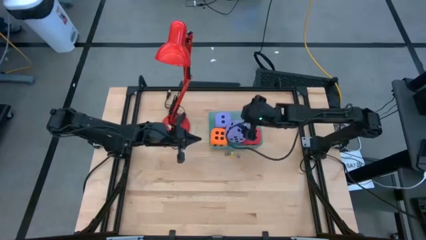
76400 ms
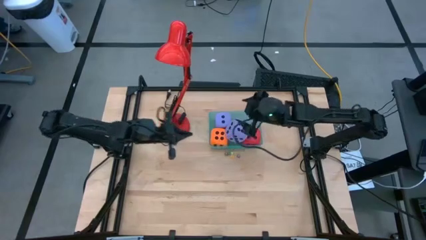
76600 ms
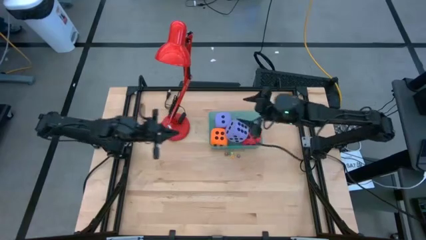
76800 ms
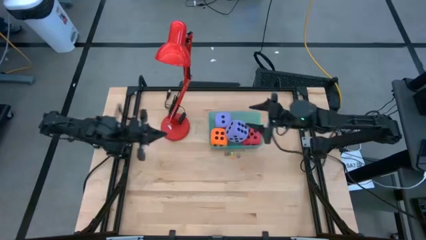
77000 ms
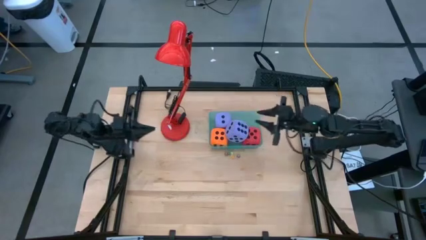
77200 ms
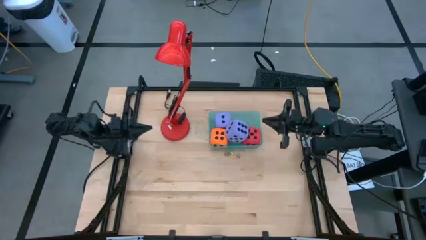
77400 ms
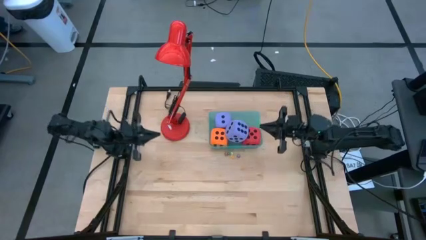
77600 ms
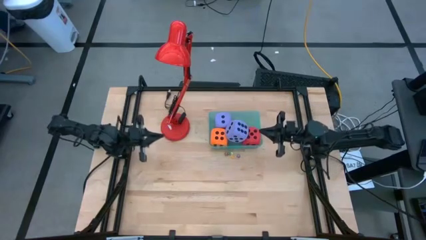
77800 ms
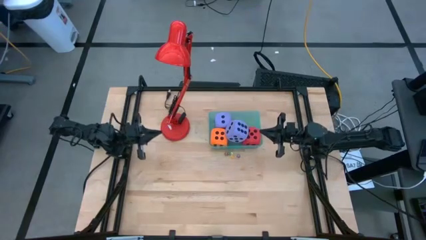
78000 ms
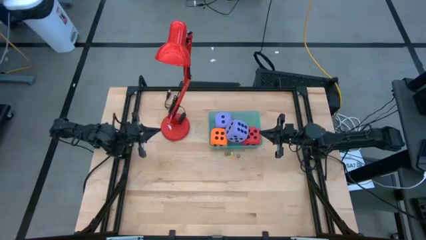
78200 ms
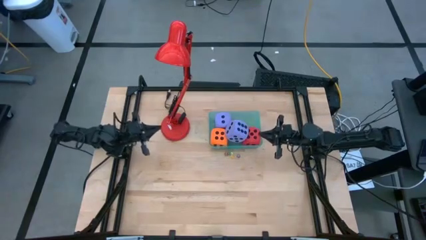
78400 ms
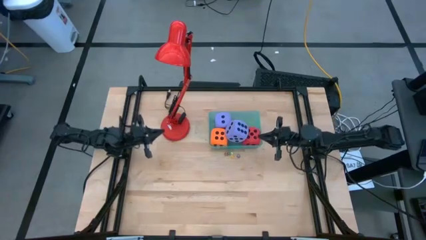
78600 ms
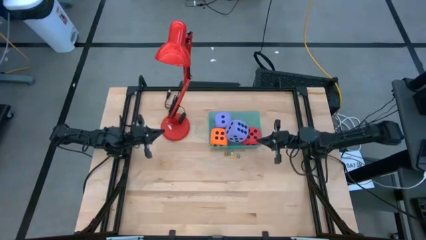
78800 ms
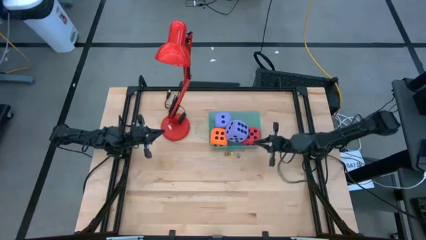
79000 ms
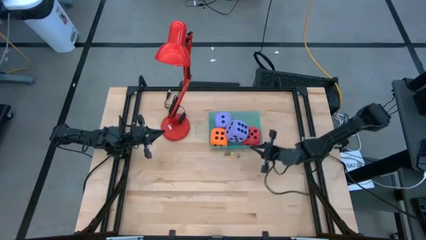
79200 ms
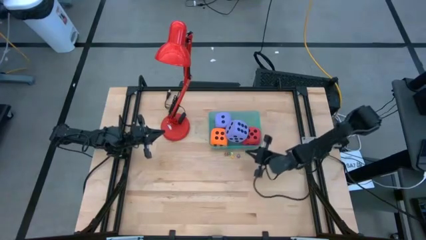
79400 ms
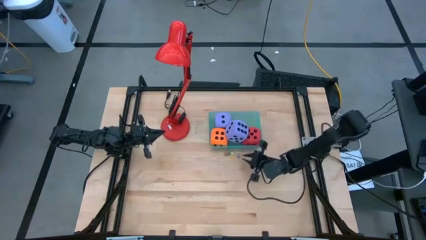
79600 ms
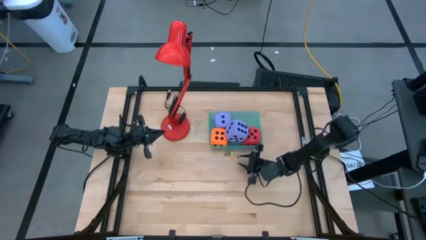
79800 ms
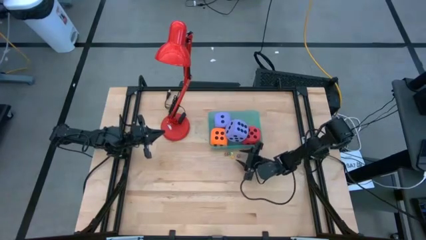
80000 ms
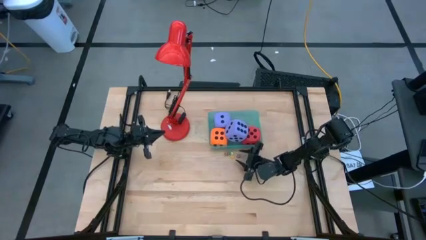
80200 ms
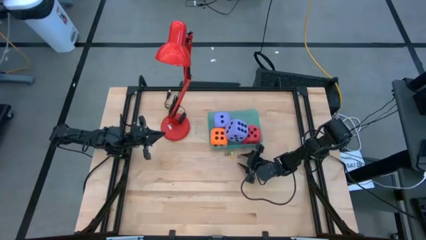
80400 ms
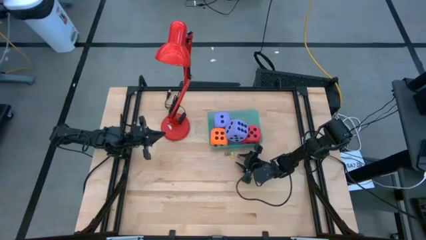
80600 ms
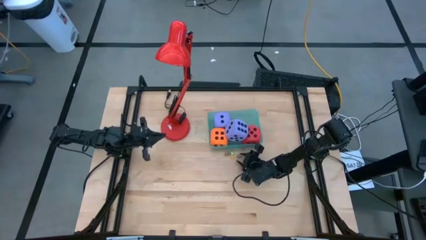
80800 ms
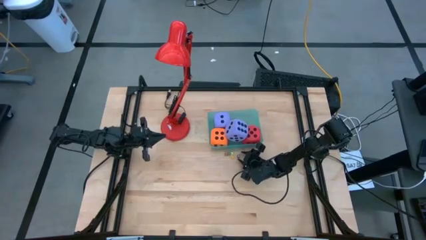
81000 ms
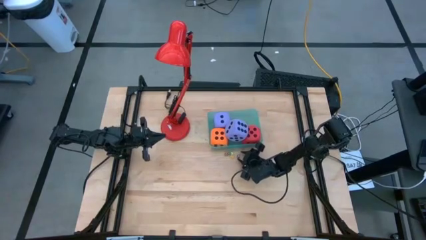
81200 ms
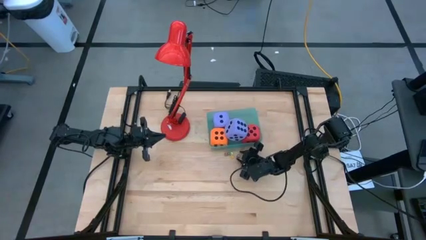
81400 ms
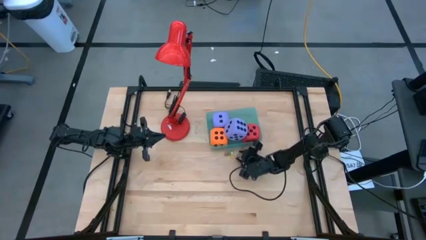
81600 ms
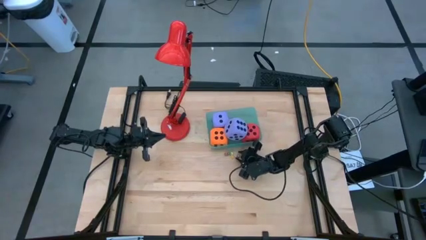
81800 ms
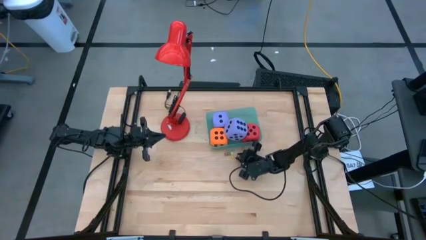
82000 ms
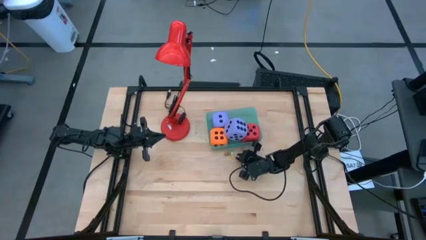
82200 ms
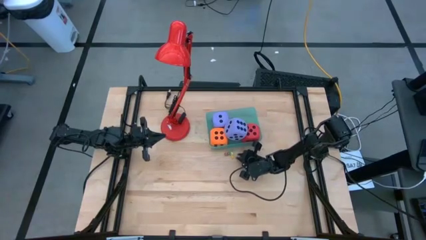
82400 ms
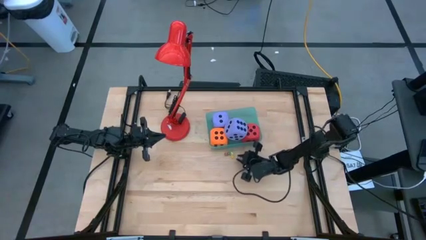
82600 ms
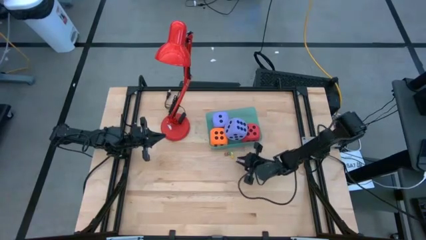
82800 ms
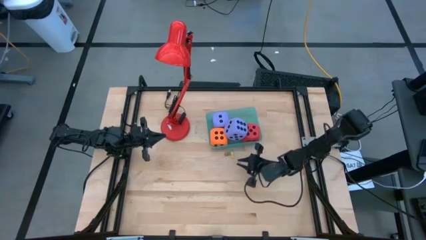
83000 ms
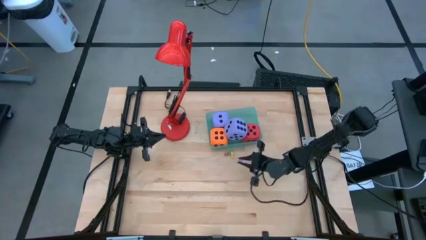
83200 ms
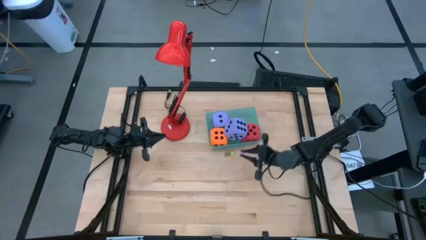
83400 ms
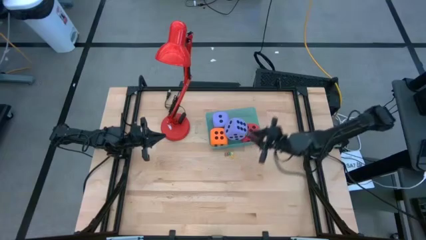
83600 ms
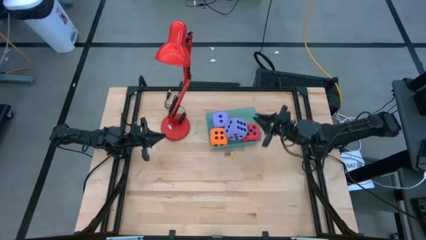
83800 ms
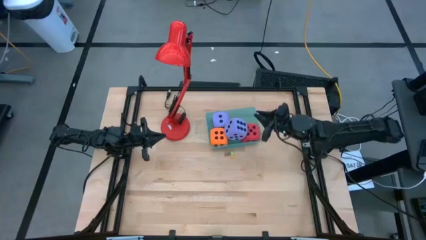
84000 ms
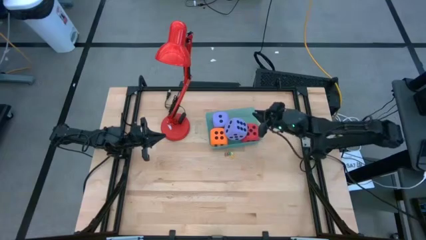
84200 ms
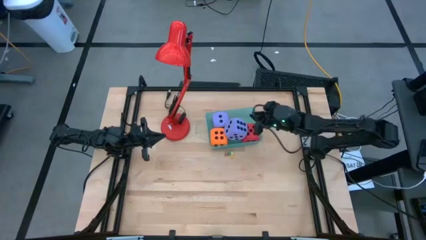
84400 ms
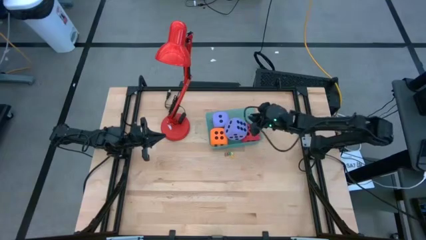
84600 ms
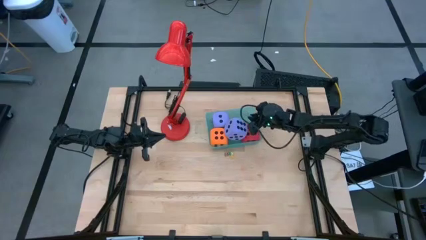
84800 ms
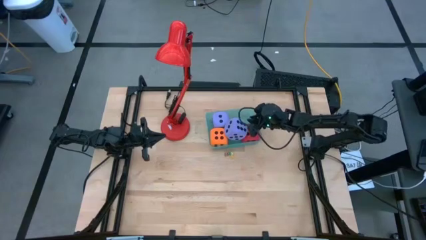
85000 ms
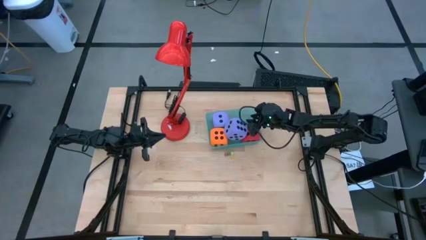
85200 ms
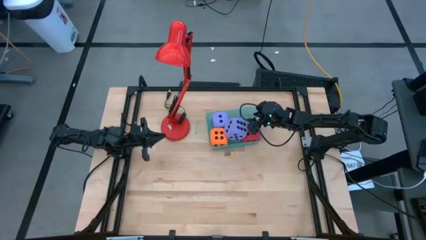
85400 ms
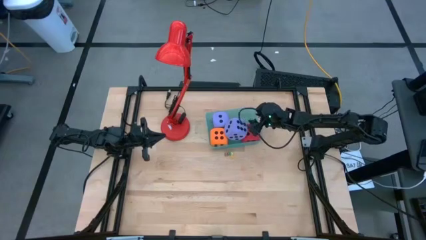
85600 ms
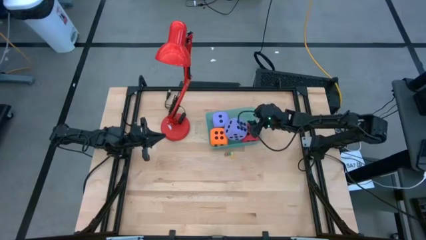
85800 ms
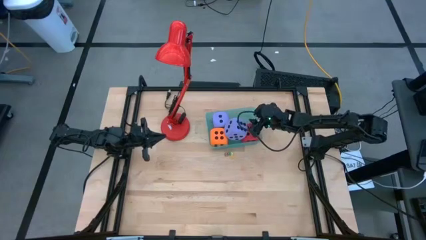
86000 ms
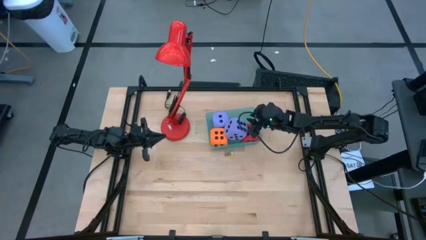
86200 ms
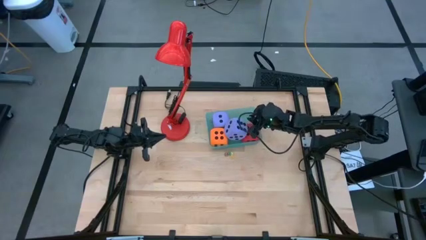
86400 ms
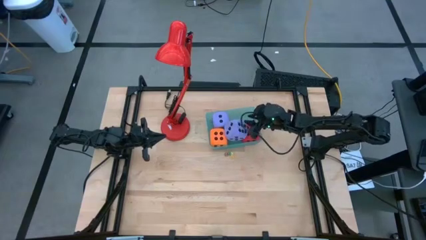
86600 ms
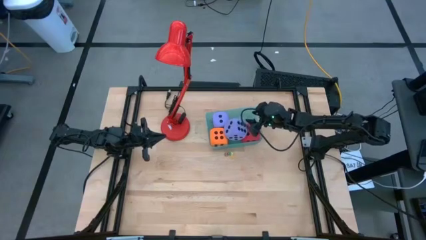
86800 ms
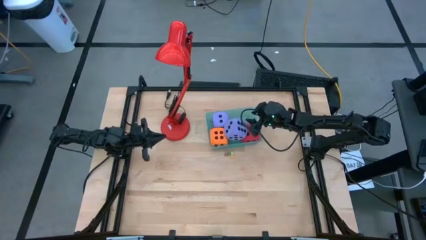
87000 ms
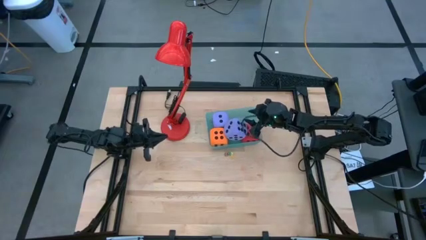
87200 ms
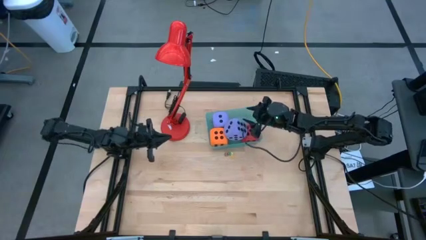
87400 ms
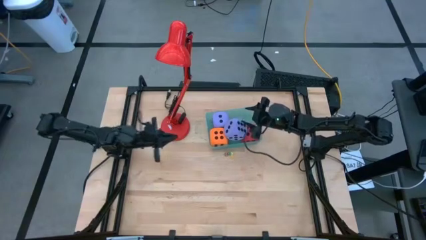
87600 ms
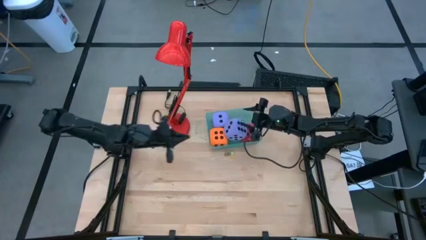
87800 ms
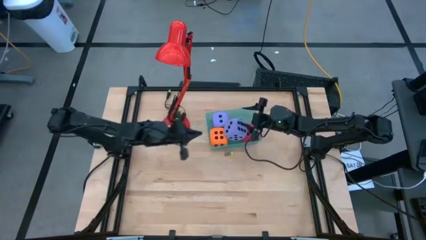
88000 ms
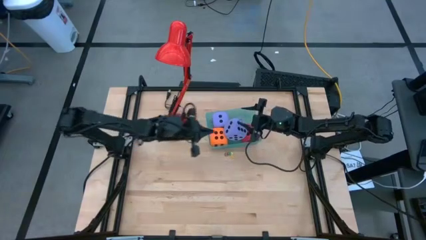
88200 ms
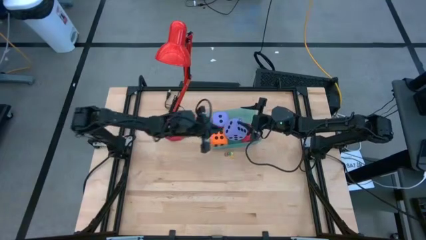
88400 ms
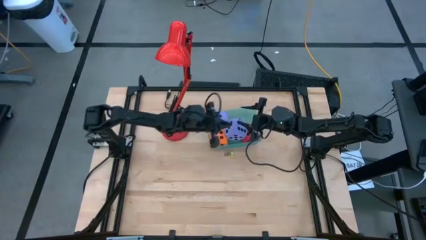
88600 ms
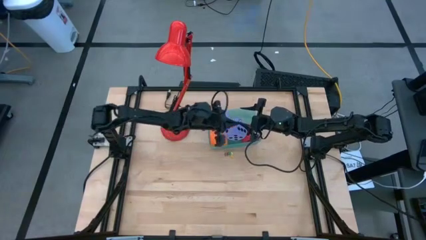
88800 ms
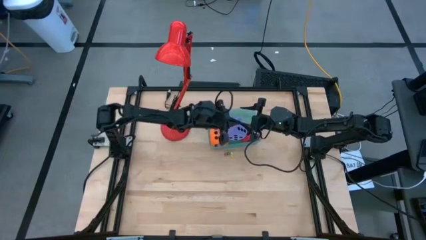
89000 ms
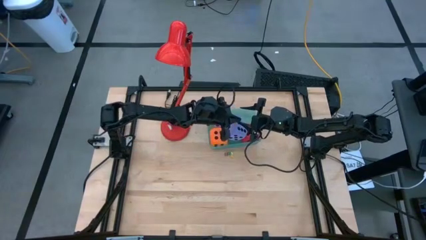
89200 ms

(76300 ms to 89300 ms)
Task: Pick & Place Dice
Put the small violet dice into the bin

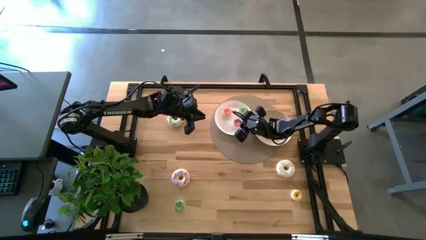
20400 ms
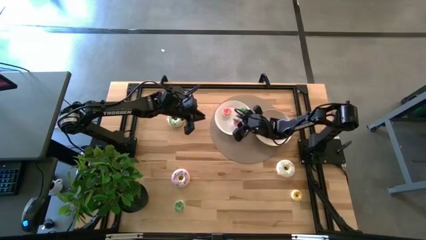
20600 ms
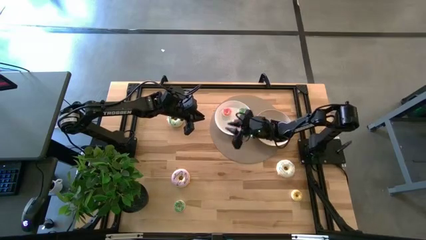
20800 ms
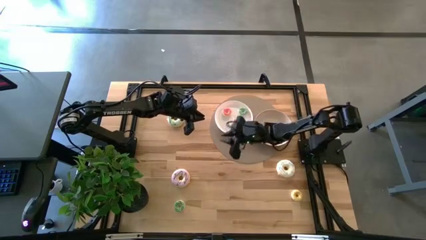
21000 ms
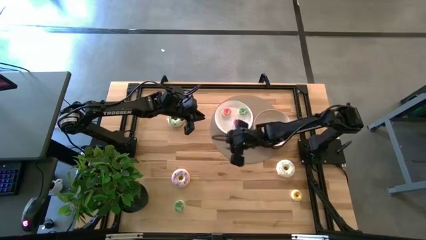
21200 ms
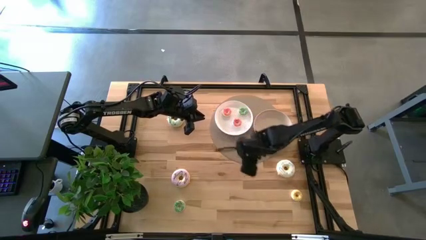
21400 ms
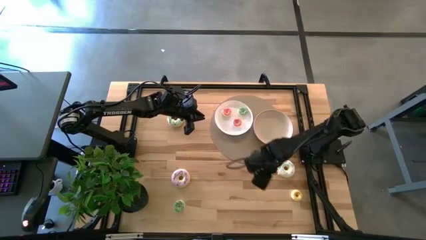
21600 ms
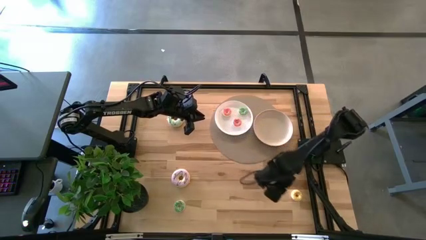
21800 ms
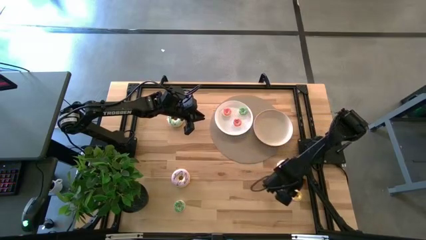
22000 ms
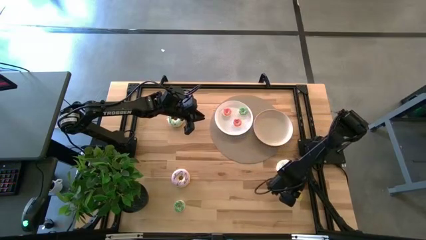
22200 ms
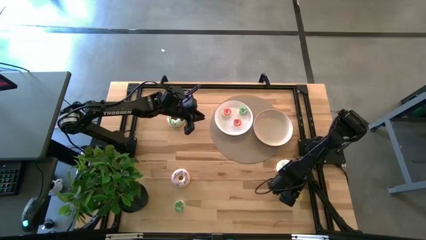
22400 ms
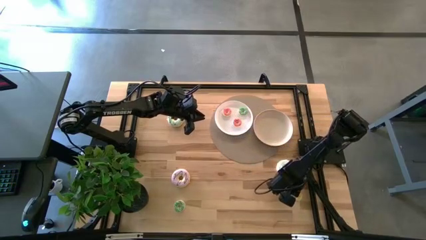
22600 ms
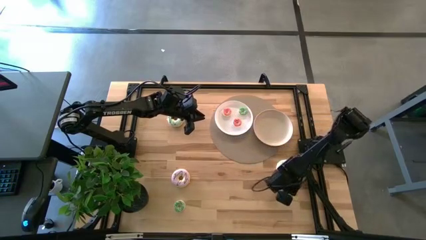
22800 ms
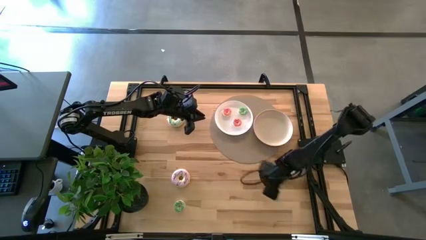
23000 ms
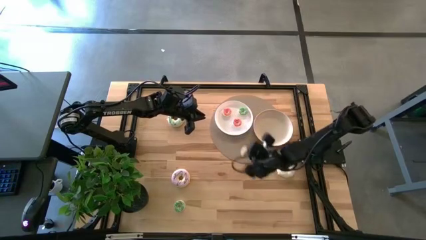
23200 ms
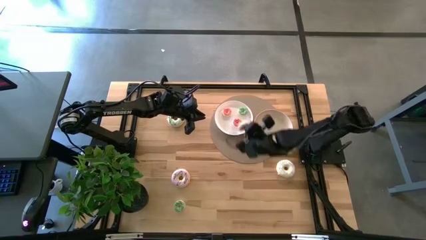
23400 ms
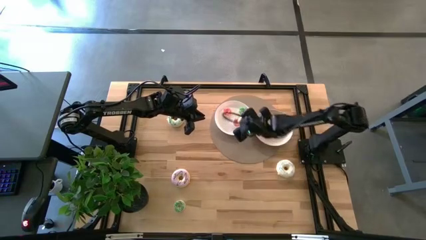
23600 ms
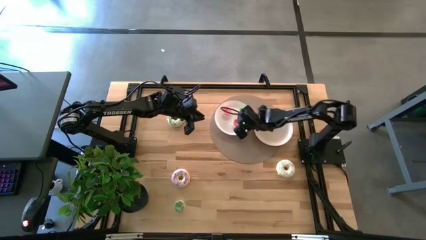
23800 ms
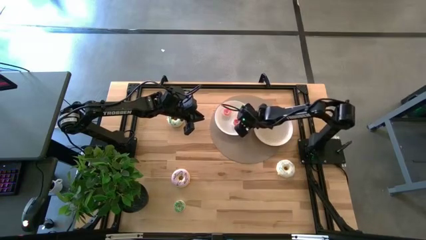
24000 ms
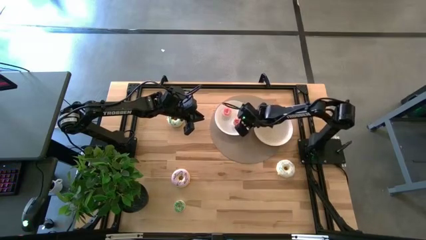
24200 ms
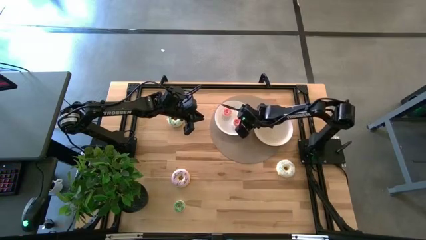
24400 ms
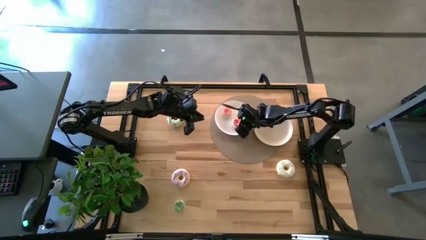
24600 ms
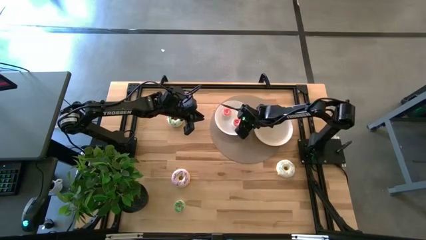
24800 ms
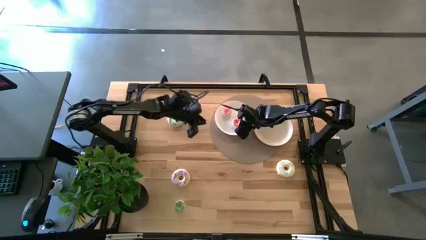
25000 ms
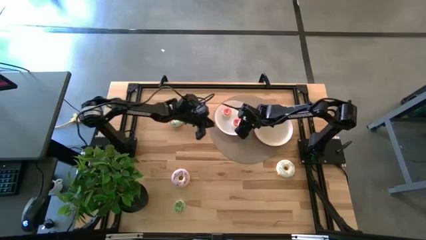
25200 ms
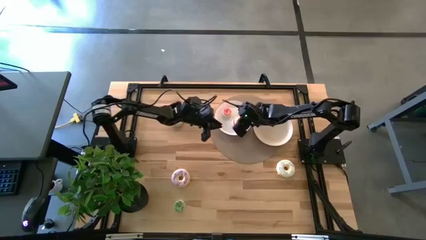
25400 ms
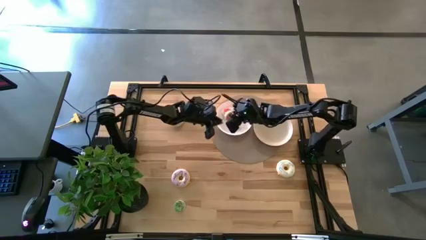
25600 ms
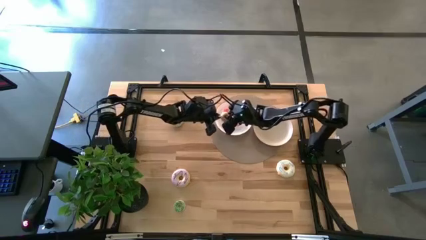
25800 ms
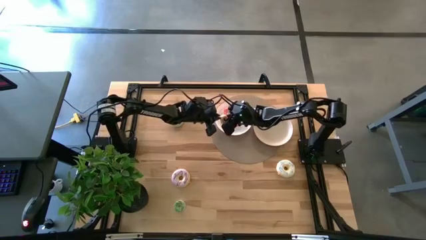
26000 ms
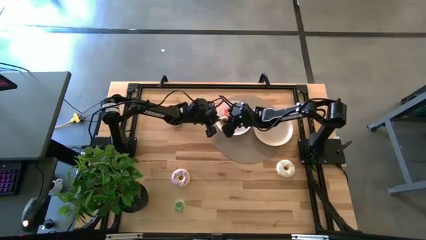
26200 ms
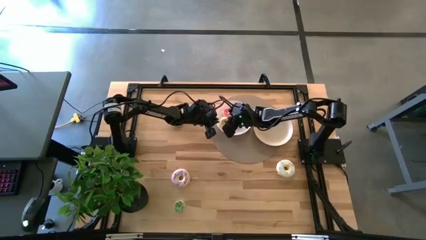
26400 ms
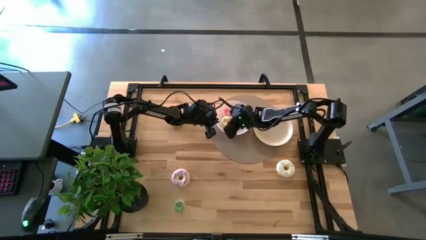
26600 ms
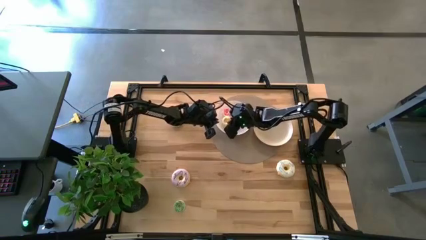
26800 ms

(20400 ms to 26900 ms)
Task: Pick & Place donuts
Put the small yellow donut on the white plate
